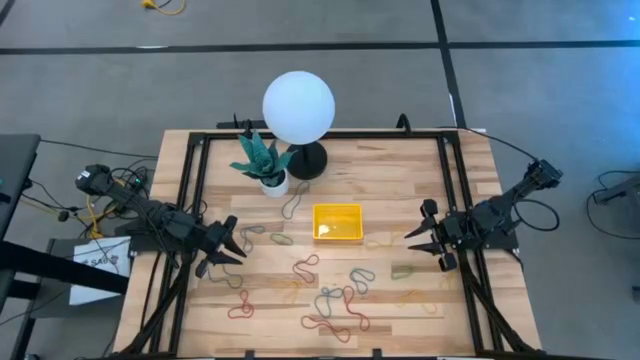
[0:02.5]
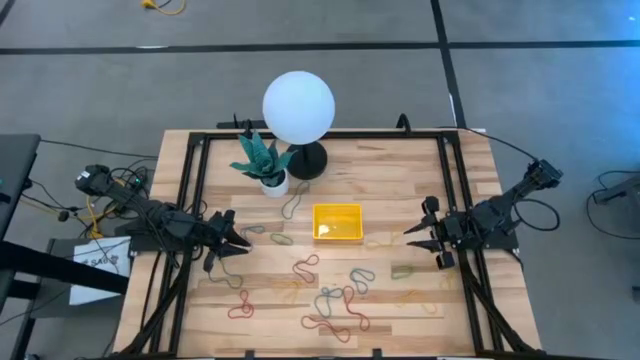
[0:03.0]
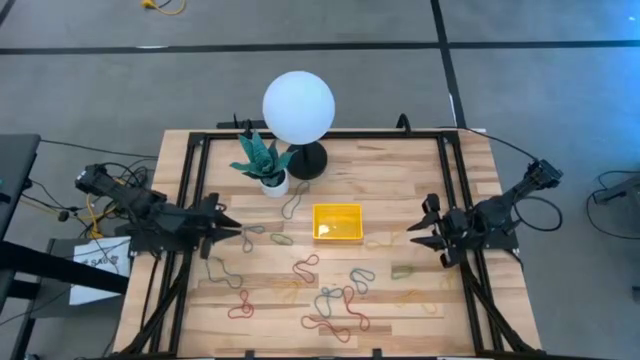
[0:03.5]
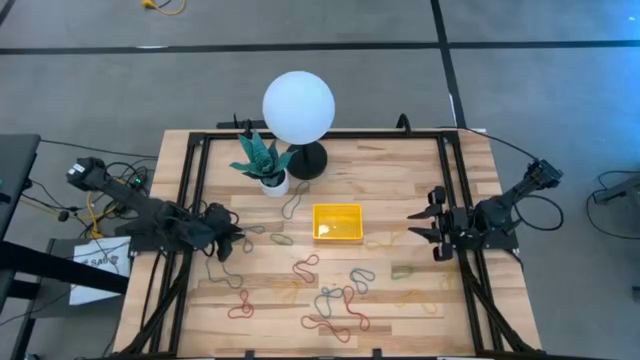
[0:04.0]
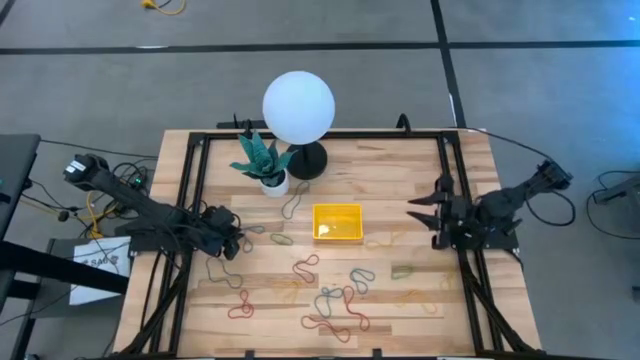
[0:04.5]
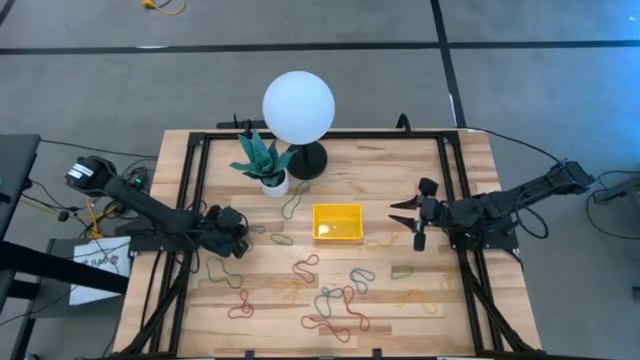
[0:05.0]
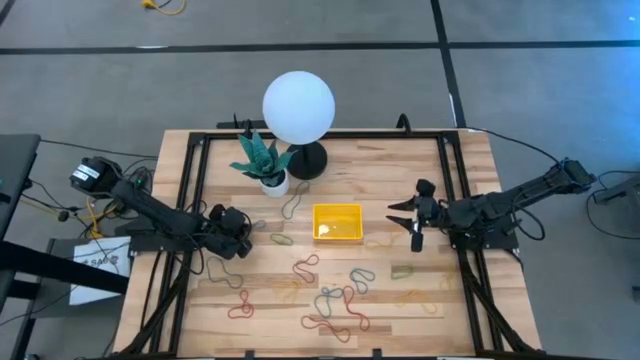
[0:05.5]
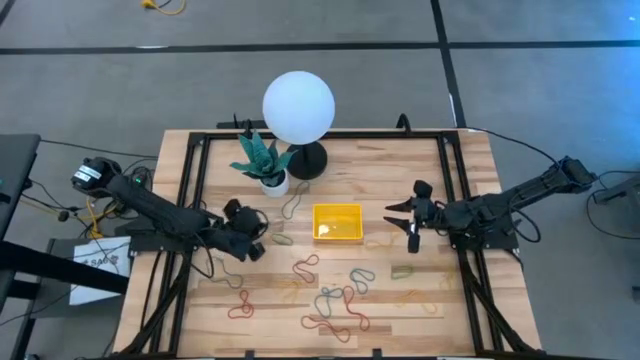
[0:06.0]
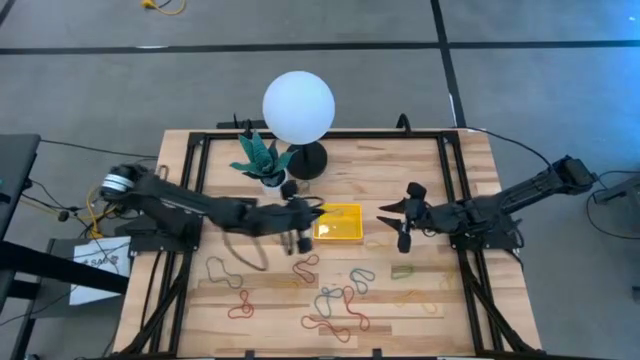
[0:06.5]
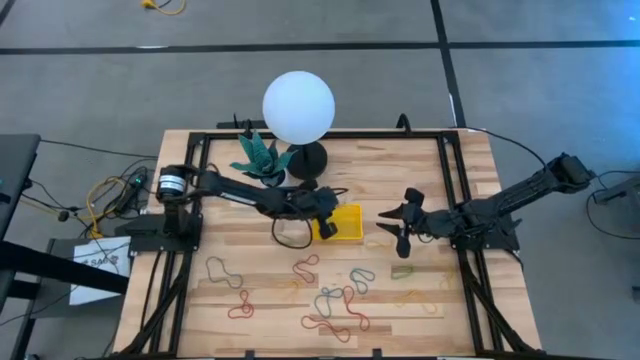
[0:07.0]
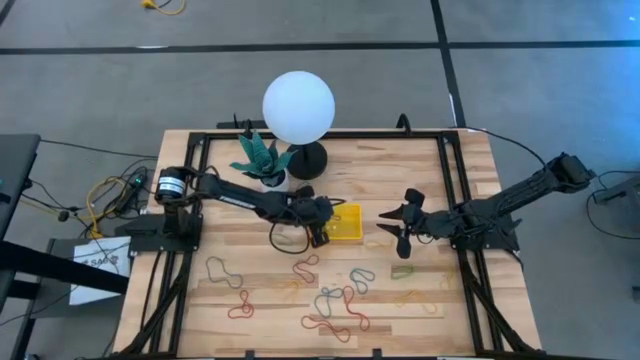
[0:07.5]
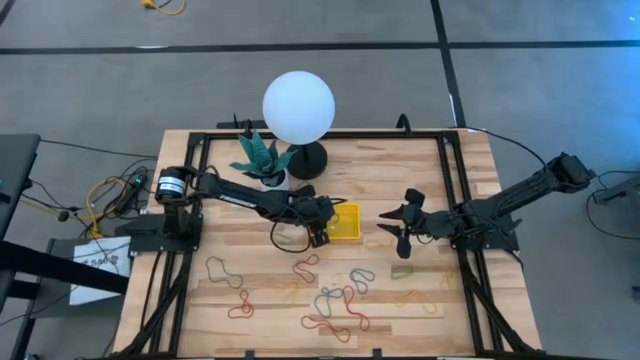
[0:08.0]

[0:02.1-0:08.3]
Task: Pick and place items into bin
Put the blue rubber band into the yellow bin

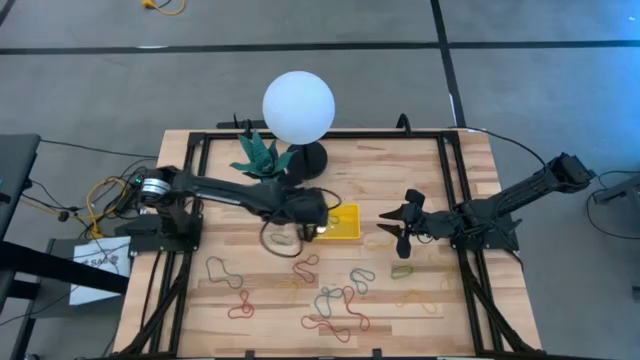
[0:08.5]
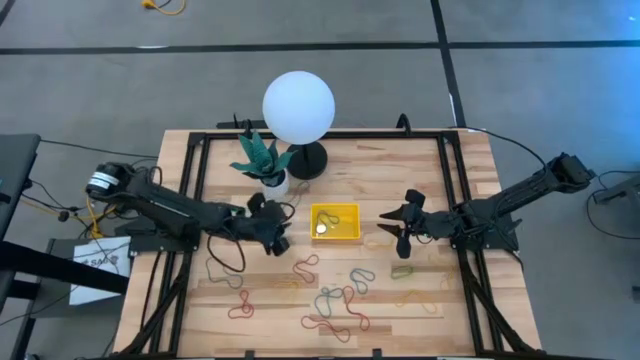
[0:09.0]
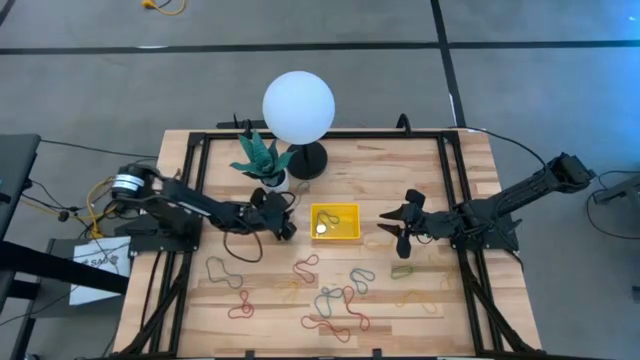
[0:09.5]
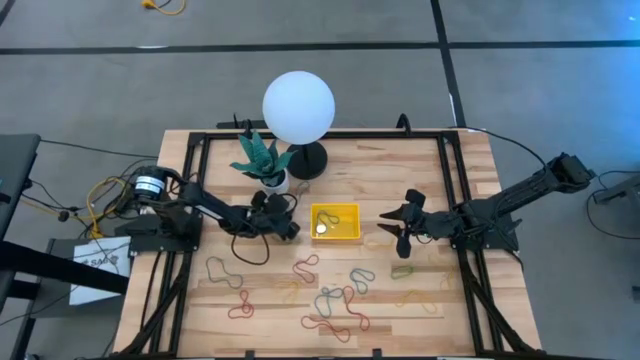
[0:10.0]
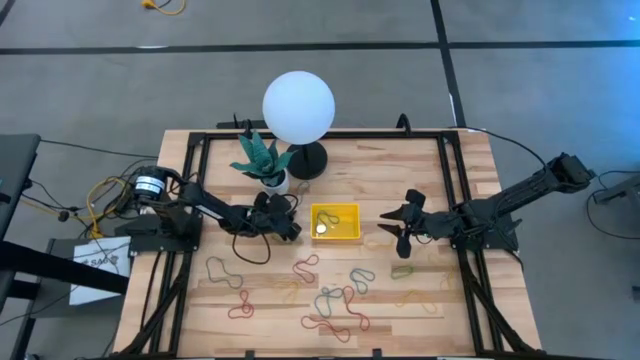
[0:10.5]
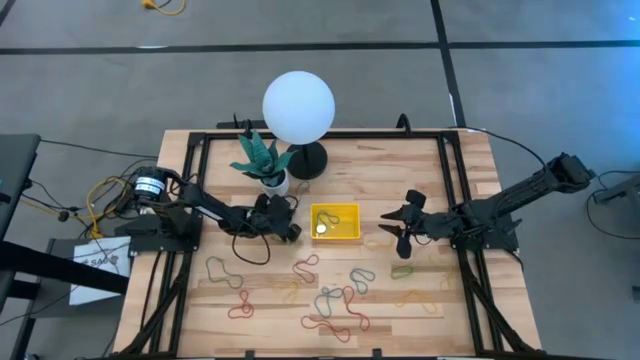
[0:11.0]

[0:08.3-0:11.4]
Put the blue rubber band into the yellow bin

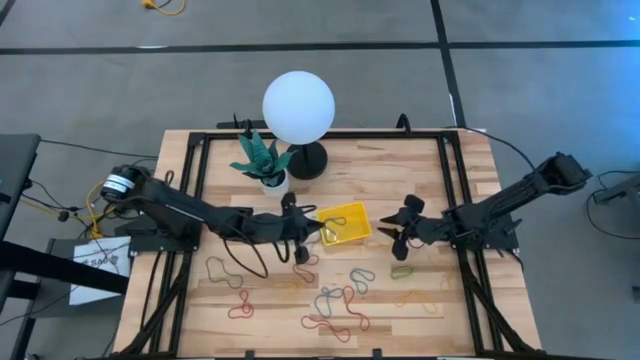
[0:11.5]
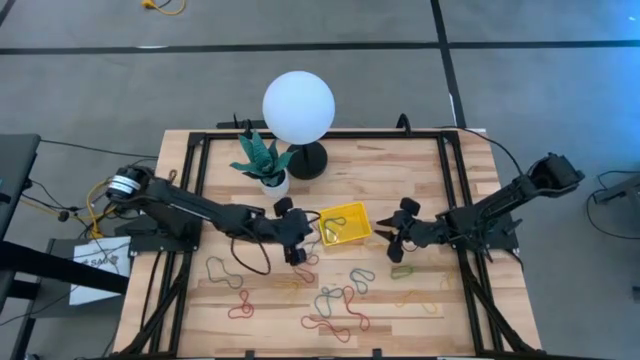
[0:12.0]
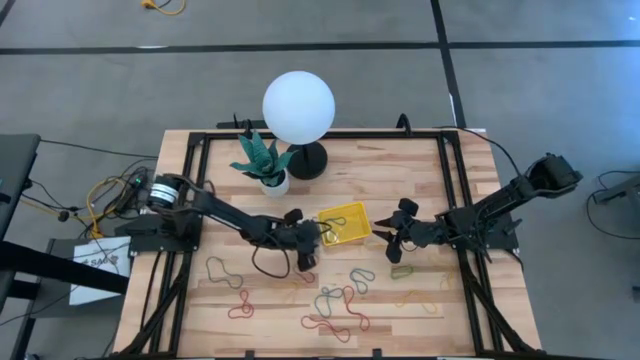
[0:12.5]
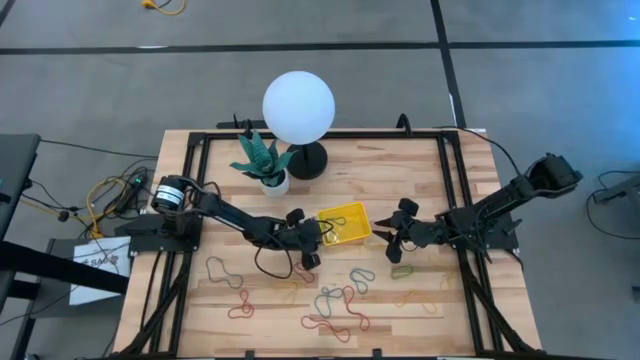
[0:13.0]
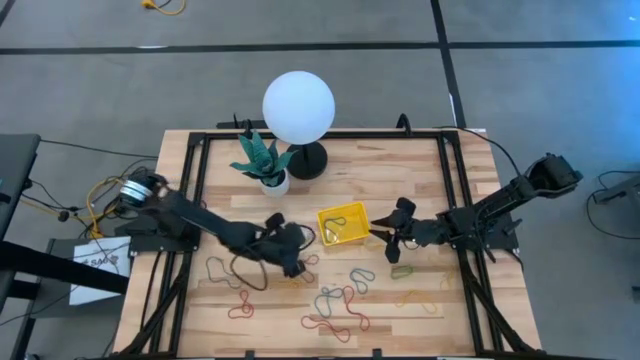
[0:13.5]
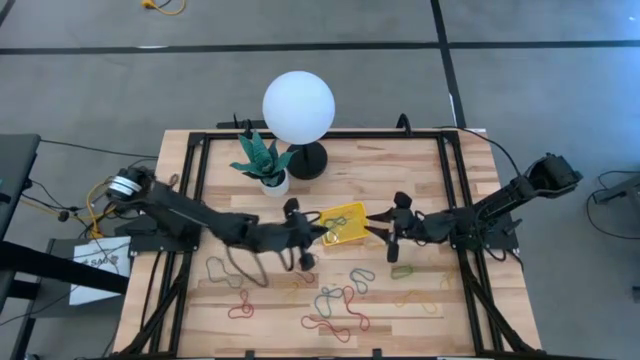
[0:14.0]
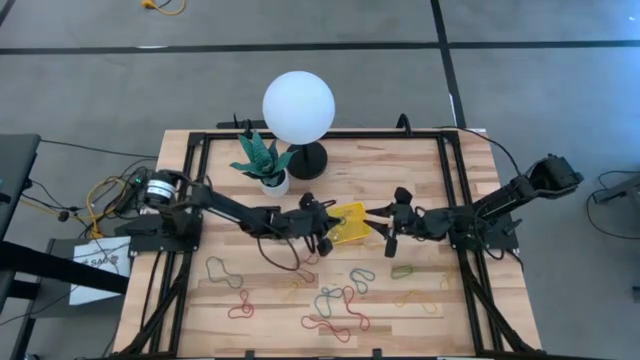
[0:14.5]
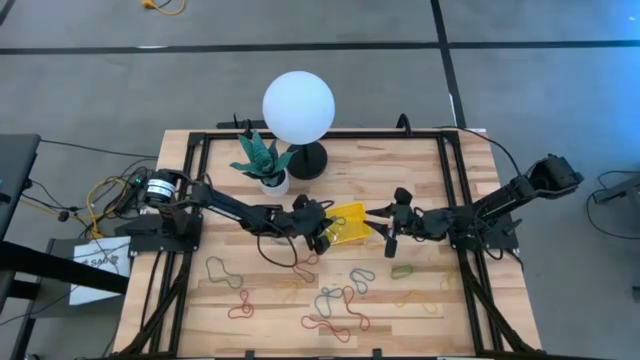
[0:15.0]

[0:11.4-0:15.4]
Put the blue rubber band into the yellow bin

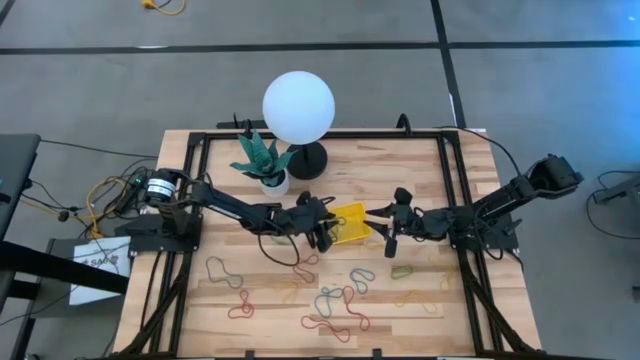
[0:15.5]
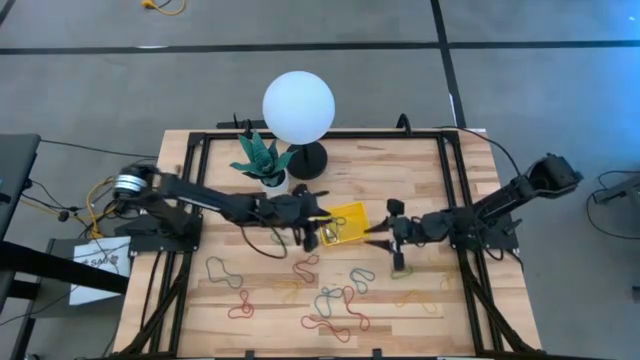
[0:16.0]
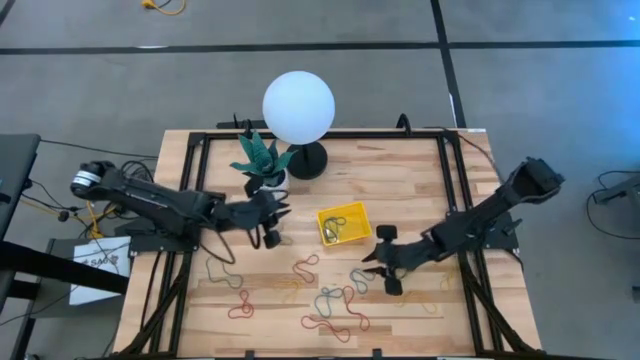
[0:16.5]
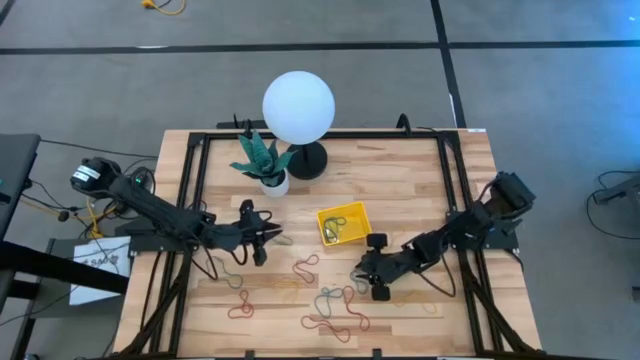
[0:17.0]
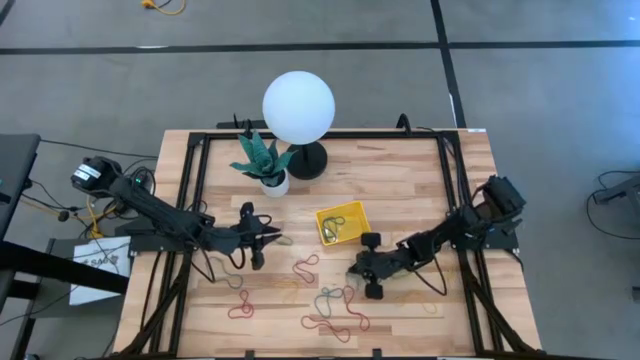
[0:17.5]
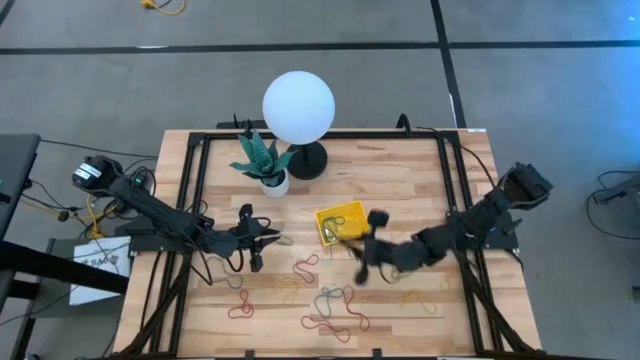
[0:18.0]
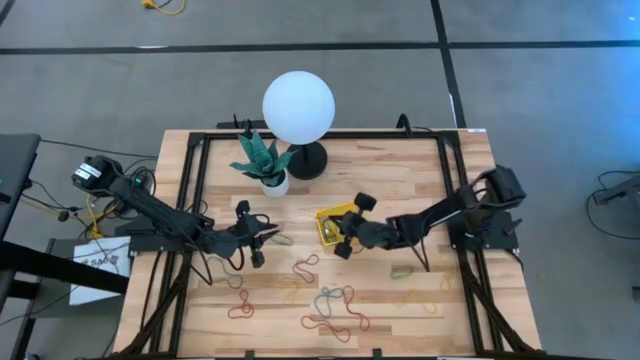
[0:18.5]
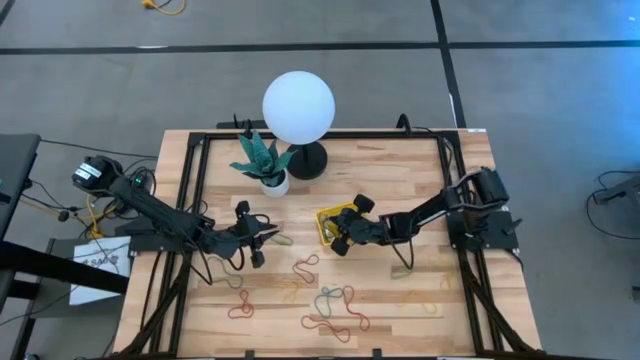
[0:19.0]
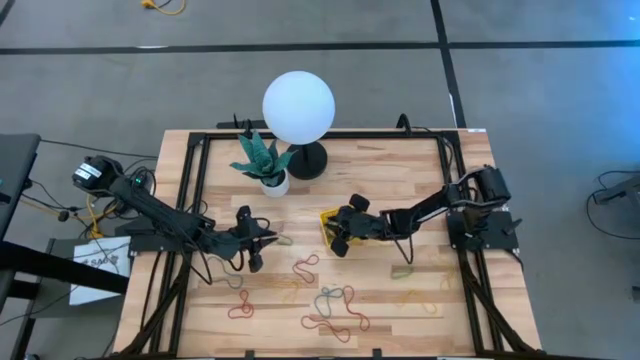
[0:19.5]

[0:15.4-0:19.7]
Put the blue rubber band into the yellow bin

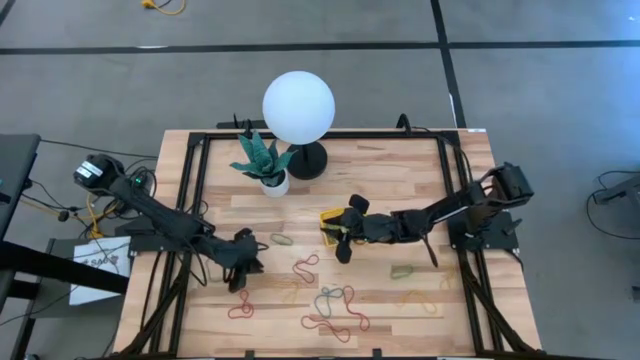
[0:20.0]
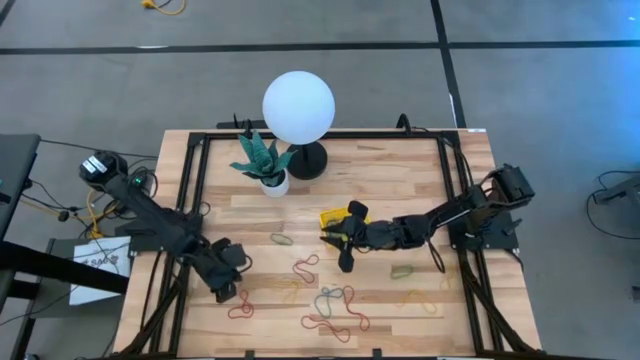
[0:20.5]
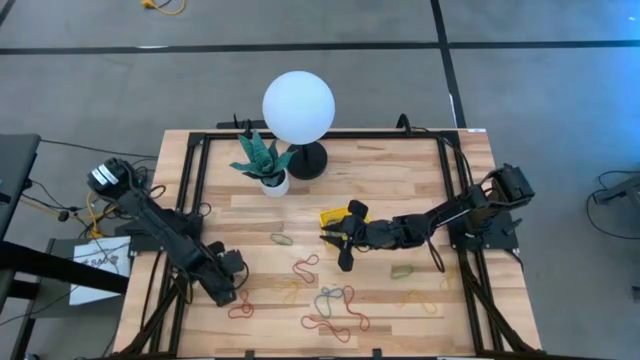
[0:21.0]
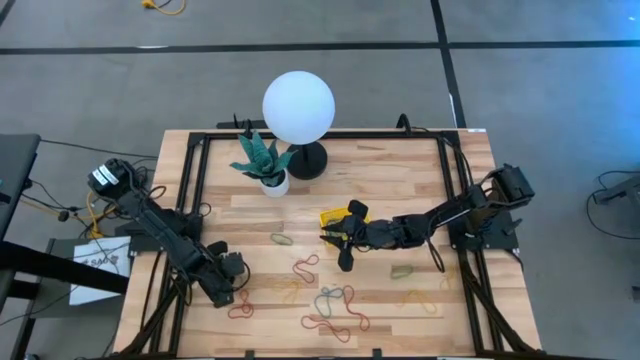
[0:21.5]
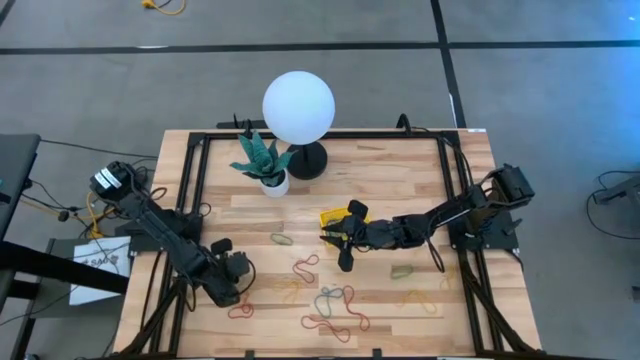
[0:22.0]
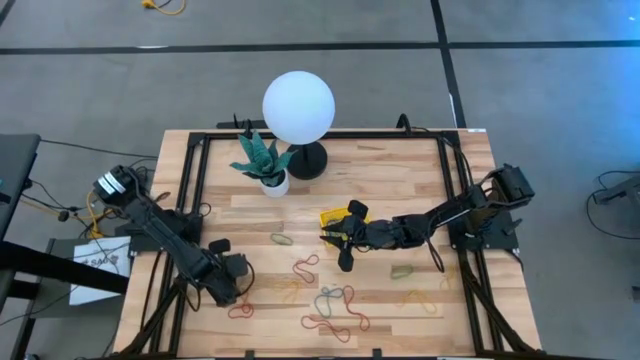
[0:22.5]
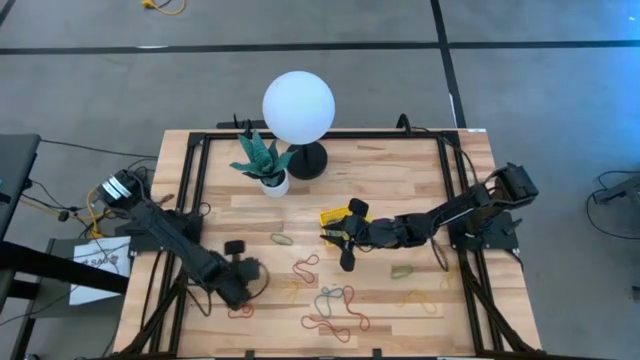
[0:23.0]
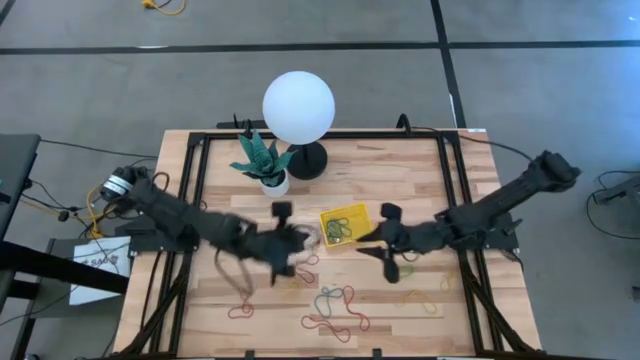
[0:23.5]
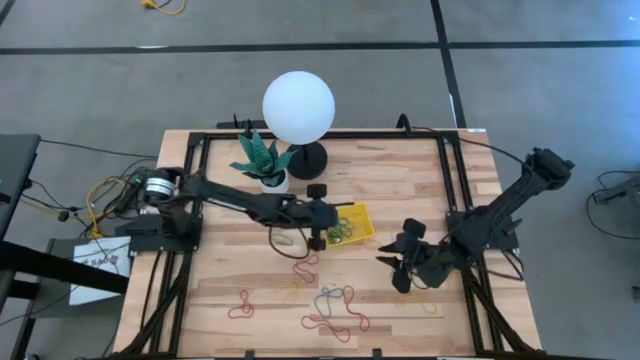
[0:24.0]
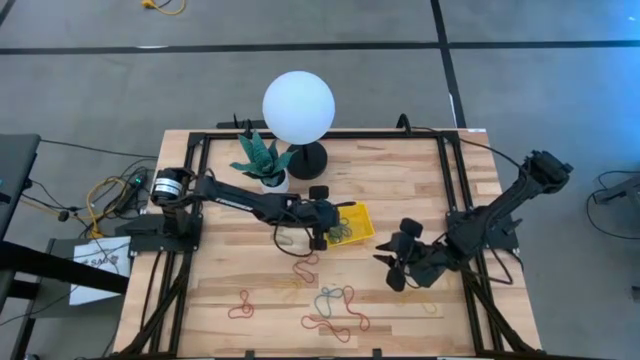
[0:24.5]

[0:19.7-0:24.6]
Put the blue rubber band into the yellow bin
